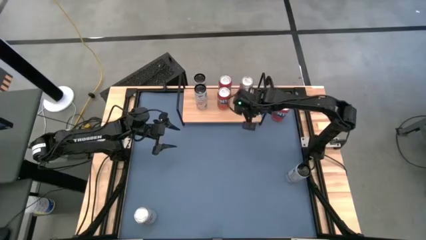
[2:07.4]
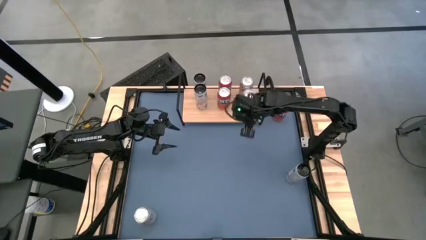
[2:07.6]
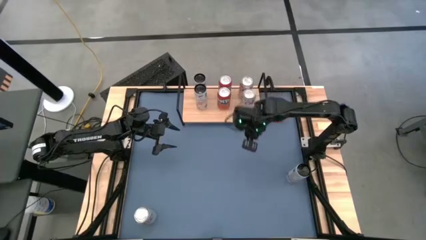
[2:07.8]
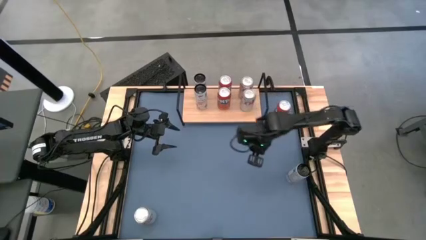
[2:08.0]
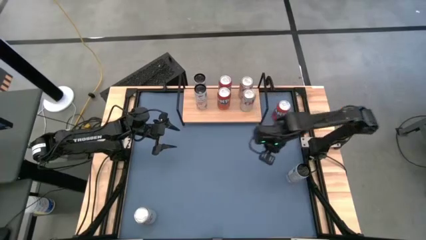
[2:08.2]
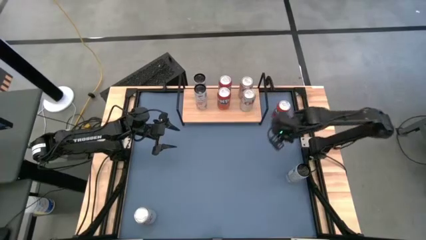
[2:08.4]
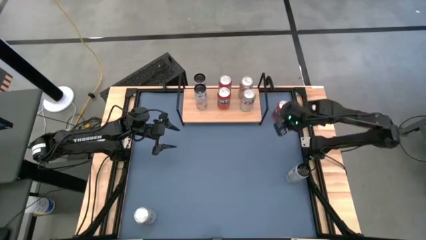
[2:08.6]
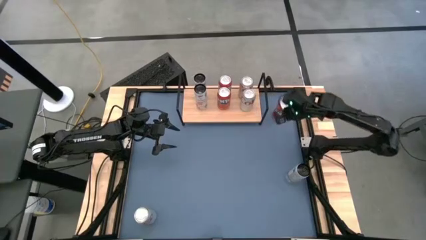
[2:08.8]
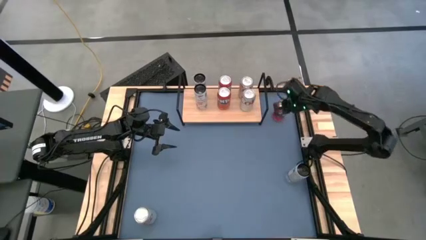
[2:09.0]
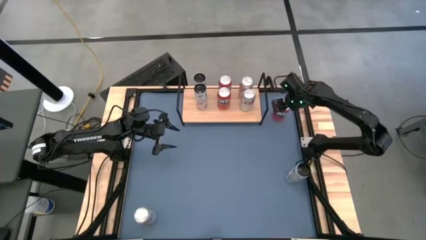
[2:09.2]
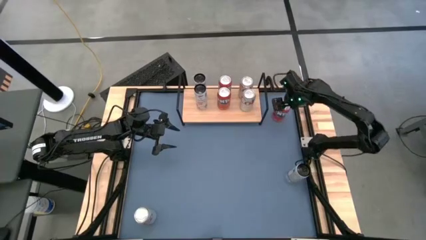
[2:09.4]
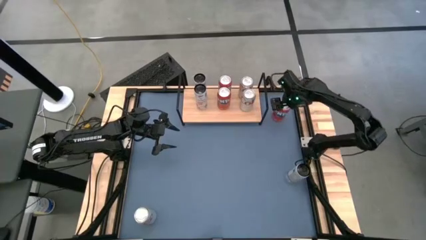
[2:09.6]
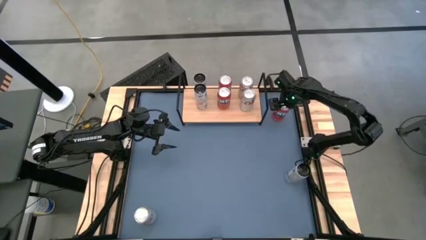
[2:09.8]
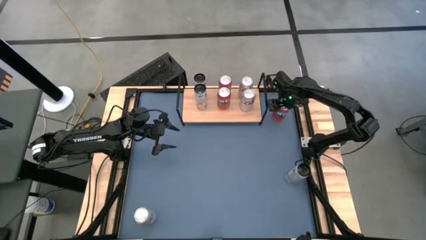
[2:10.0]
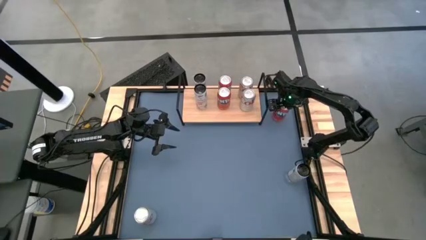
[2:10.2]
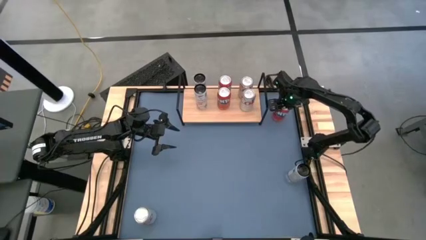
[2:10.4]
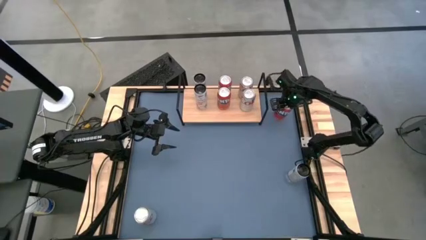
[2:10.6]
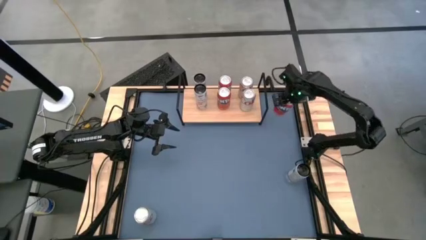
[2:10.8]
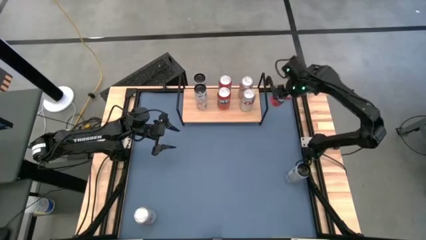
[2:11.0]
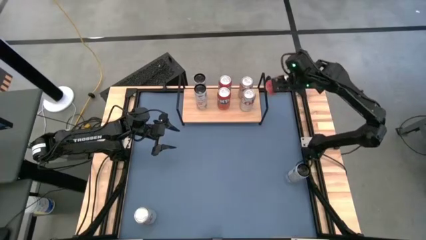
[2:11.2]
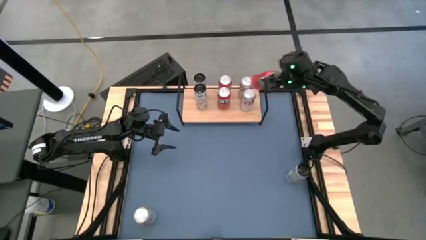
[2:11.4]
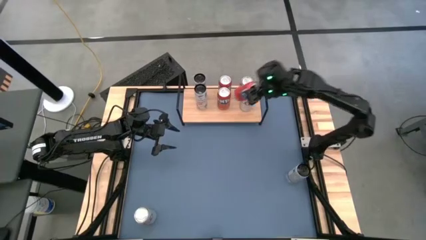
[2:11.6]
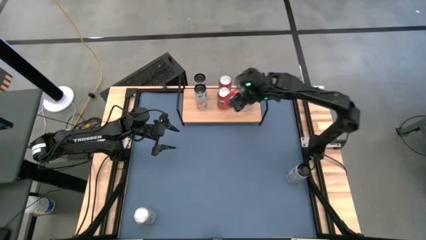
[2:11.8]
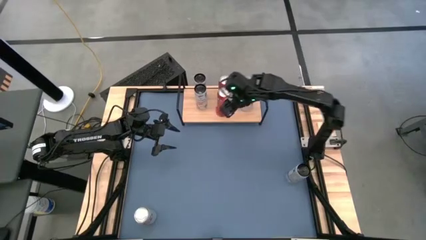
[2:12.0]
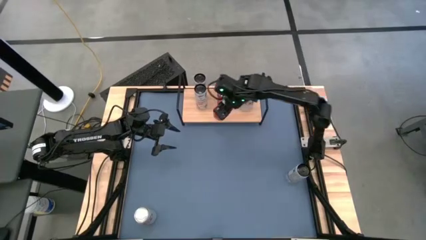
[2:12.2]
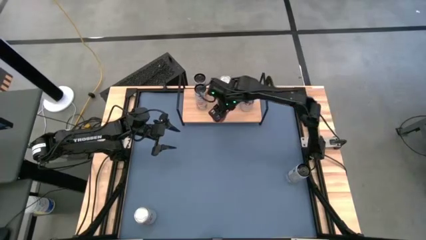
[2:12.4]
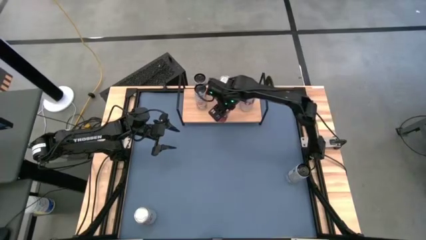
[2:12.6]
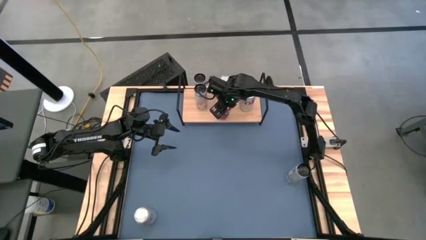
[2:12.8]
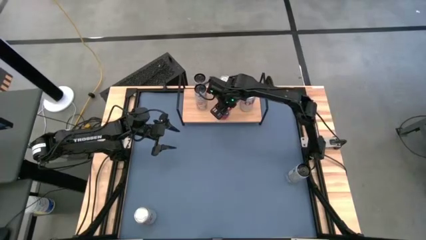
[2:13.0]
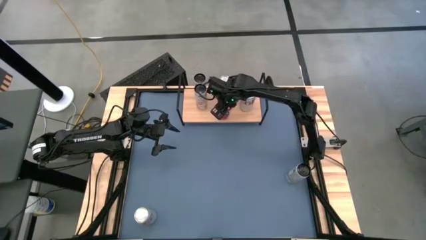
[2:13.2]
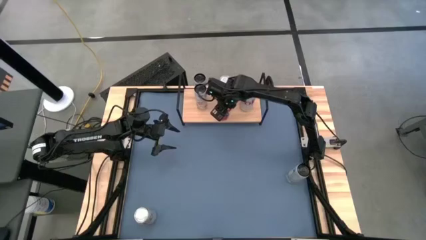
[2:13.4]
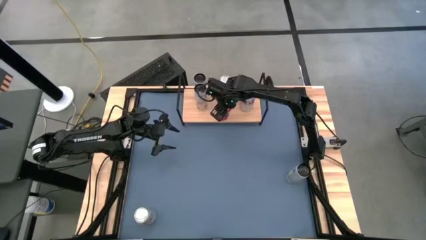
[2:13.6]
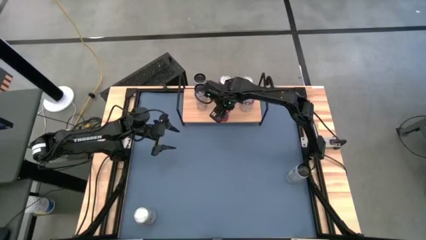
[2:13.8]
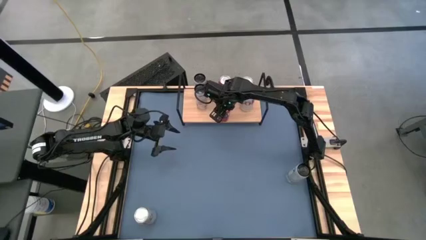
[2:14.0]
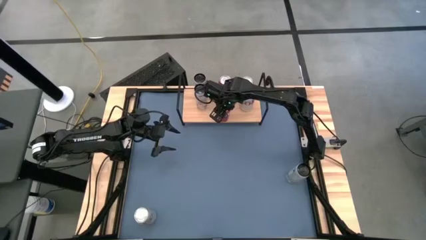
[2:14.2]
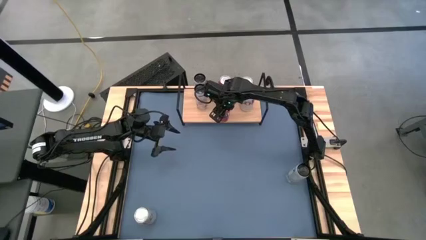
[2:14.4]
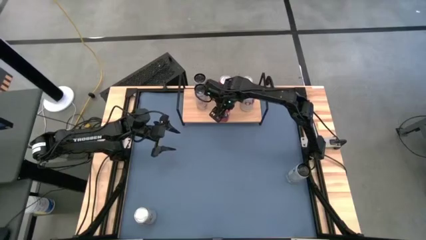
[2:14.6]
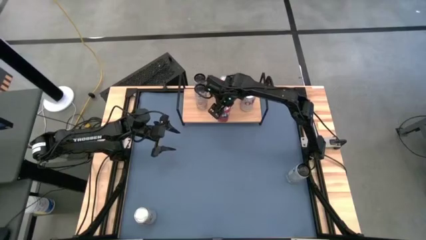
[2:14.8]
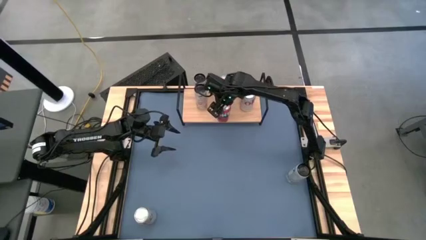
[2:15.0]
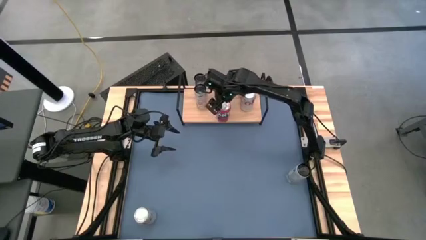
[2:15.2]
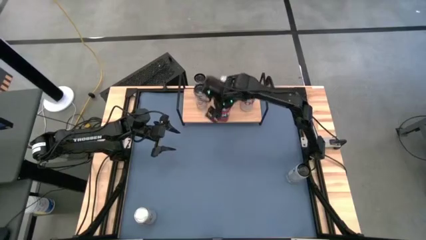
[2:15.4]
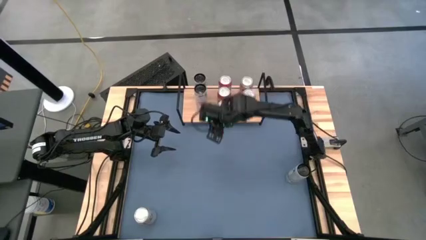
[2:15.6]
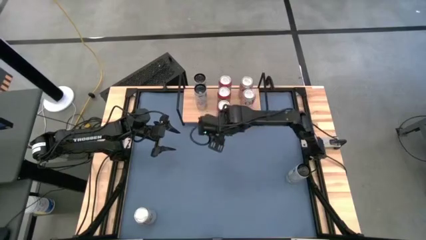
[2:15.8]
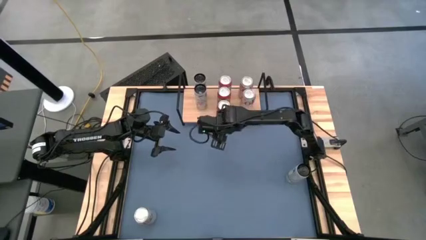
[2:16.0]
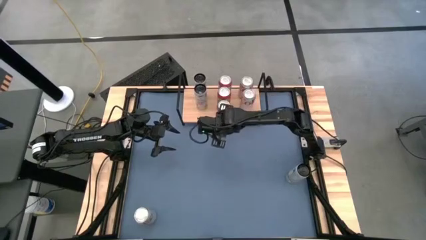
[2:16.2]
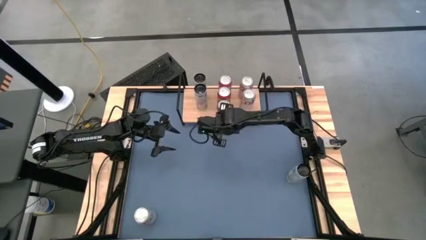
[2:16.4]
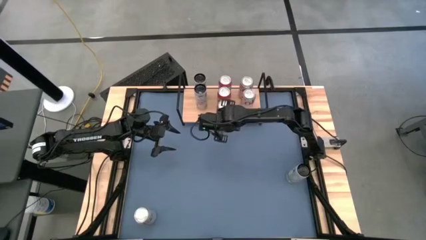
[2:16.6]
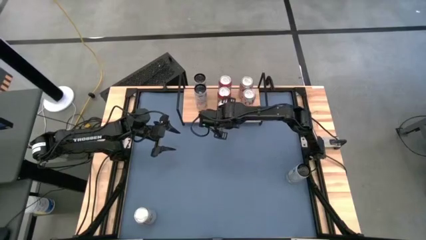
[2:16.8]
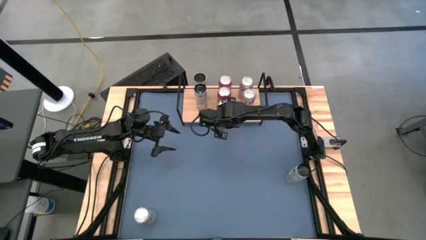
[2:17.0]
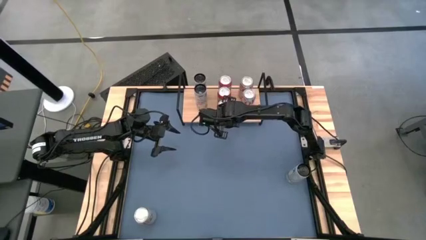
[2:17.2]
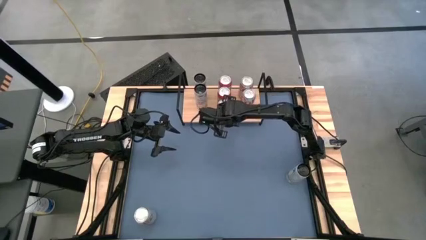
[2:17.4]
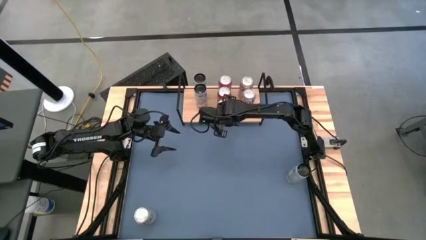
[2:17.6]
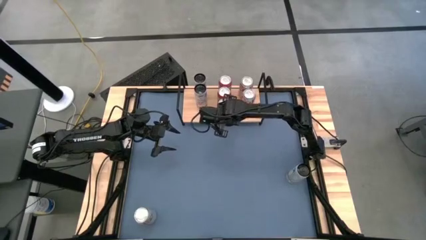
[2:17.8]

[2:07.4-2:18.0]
Task: Place canned beverage on shelf
Put the orange soda can on the shelf aligned with the other orange soda can

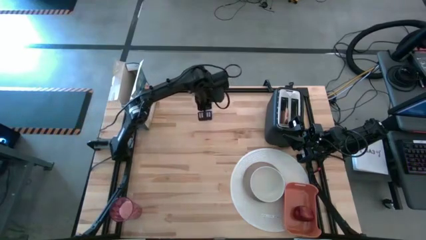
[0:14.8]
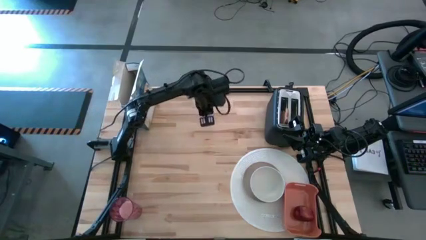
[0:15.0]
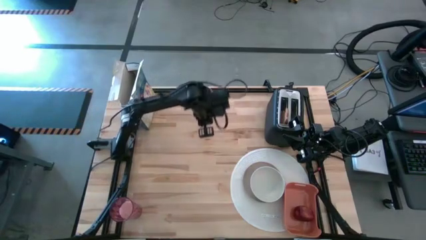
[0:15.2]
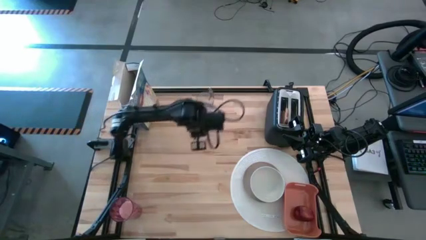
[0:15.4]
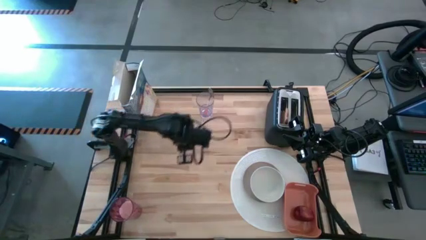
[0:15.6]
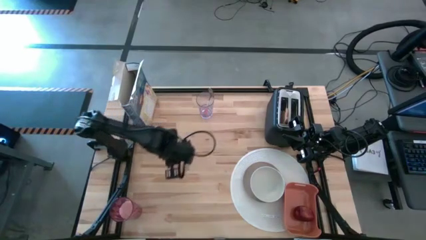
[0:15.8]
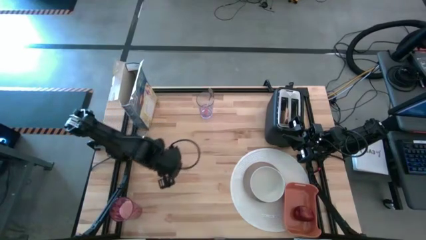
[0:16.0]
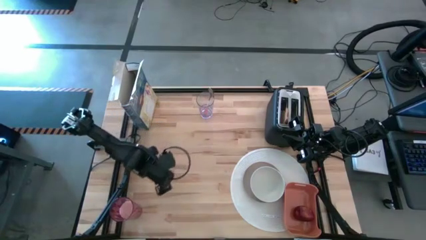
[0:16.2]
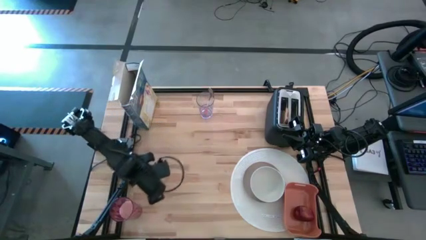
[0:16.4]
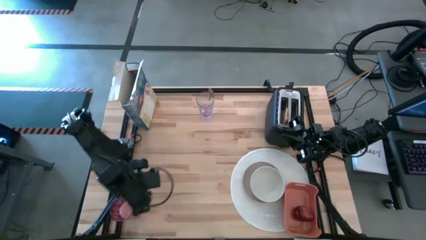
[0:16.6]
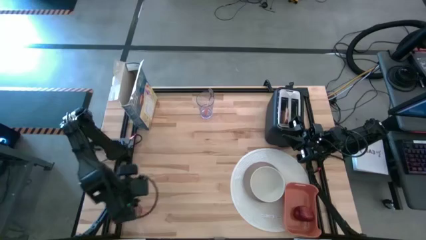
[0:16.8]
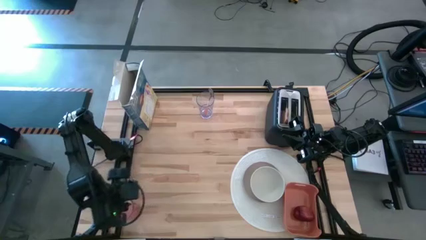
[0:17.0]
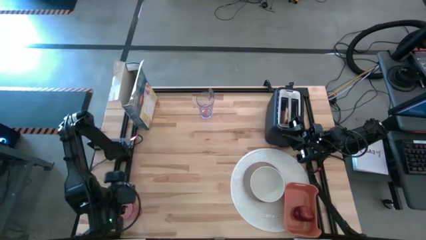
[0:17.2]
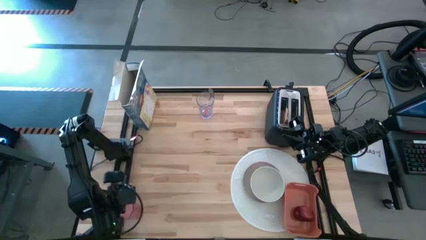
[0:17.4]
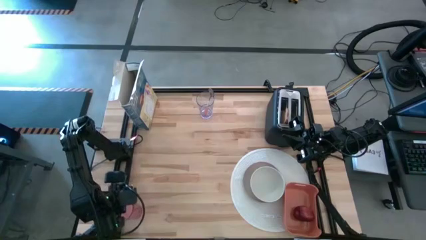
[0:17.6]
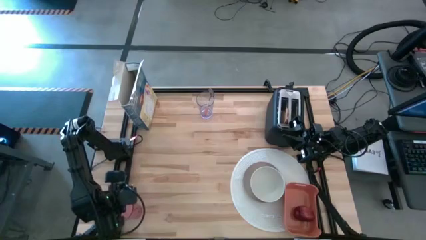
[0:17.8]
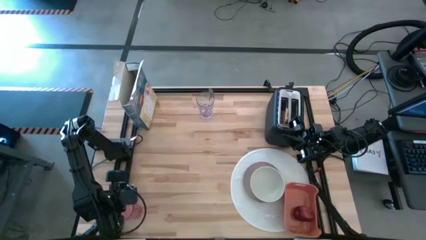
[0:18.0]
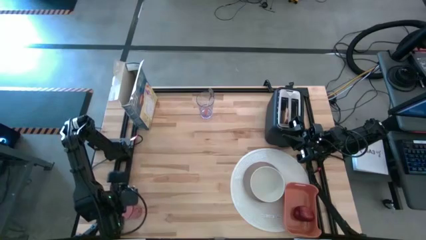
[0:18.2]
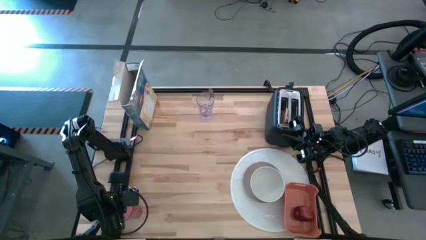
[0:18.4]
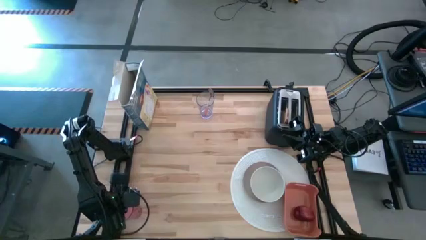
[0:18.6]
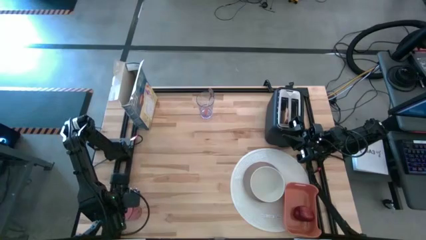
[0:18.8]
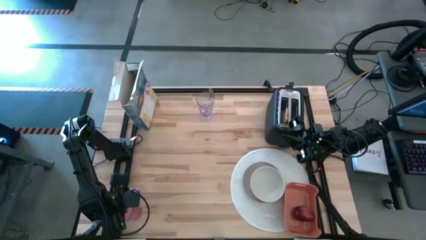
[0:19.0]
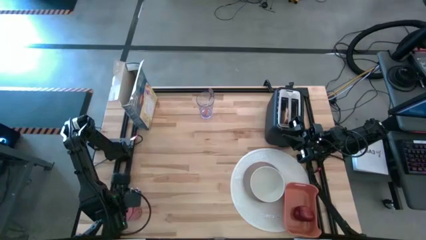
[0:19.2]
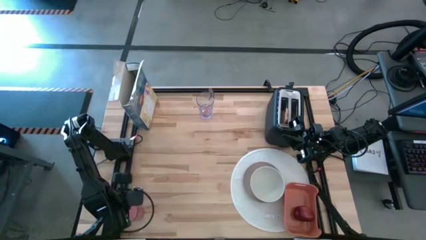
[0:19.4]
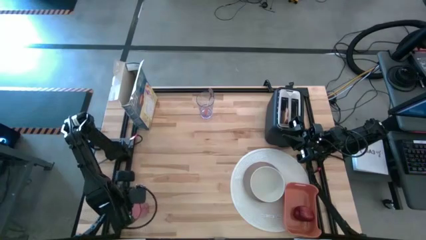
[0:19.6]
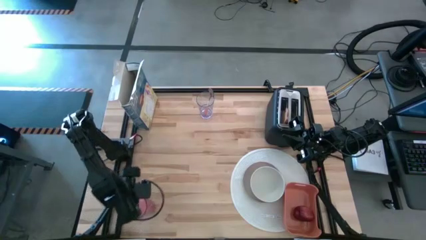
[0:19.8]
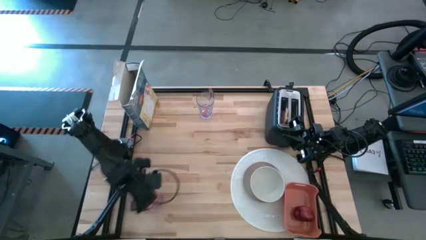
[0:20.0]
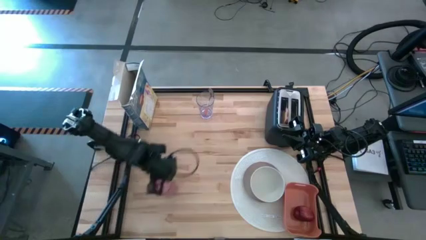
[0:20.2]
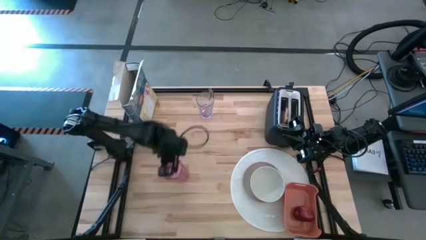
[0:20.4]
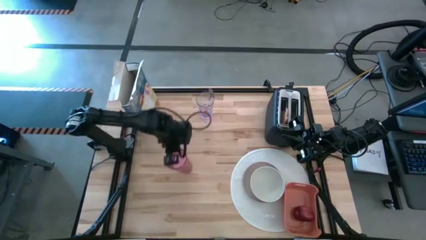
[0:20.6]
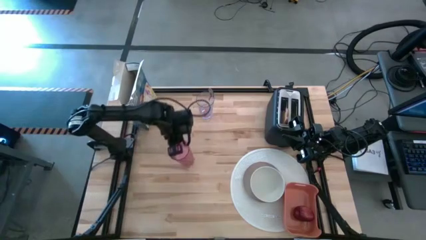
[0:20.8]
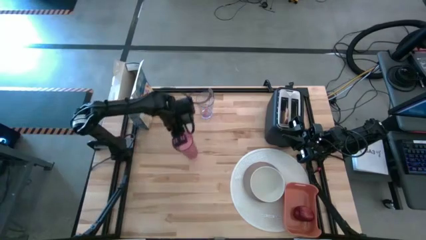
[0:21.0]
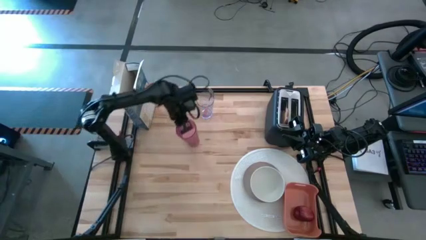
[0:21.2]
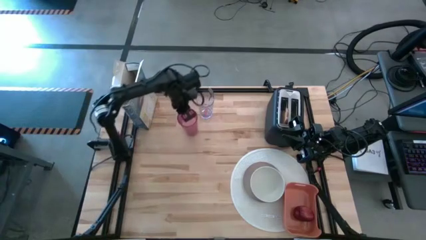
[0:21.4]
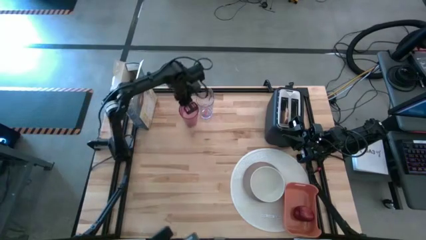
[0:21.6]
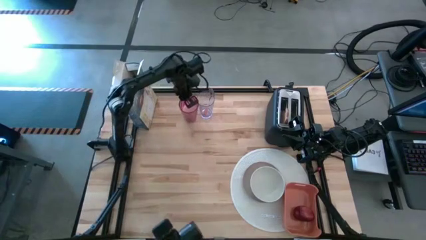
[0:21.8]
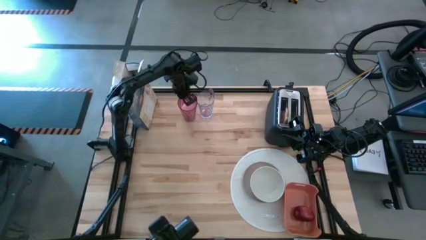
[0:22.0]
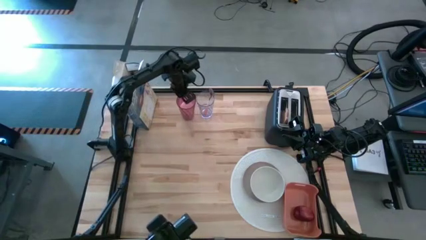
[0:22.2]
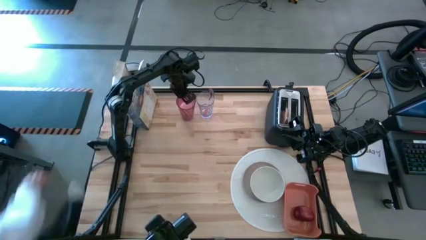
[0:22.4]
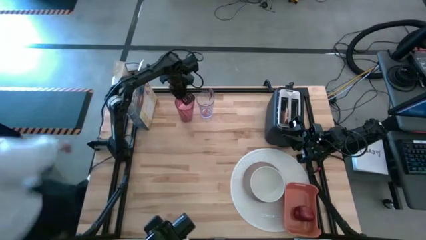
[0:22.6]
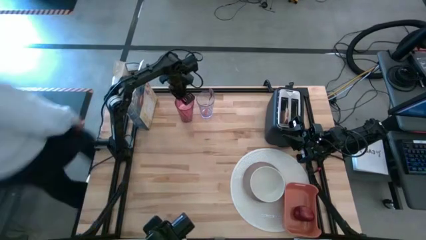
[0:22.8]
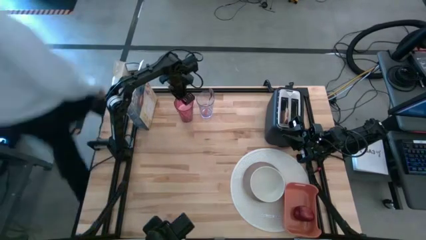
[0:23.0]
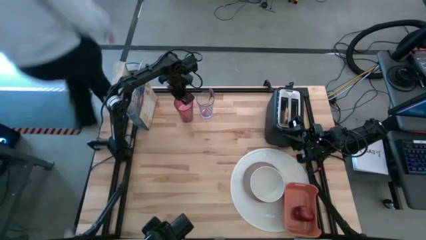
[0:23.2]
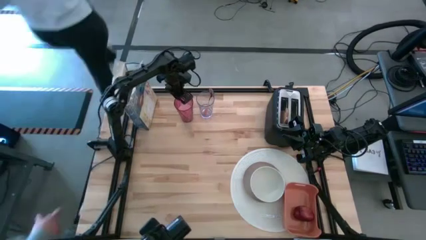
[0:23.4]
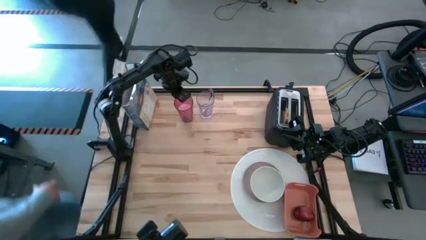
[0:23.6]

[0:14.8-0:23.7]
Task: Arrange a breakfast setting
Move the red cup of grain rice to the top of the table
